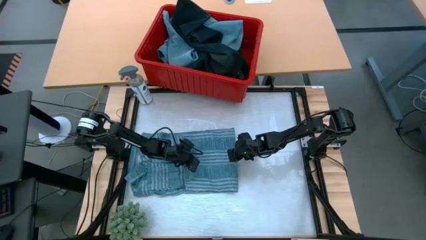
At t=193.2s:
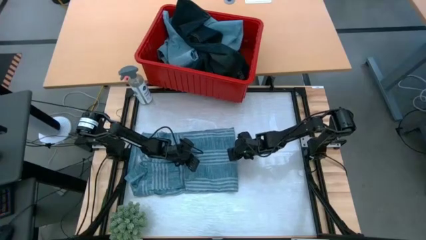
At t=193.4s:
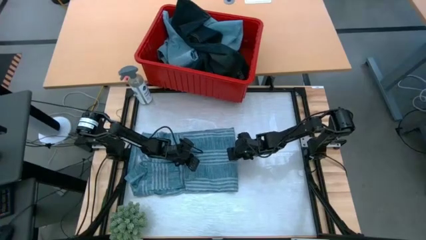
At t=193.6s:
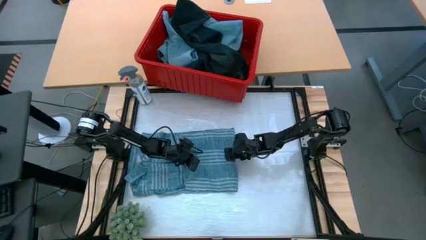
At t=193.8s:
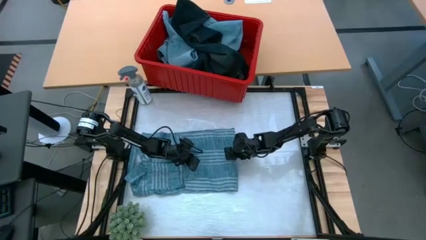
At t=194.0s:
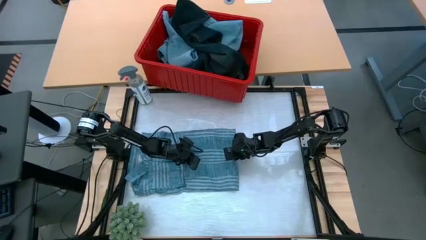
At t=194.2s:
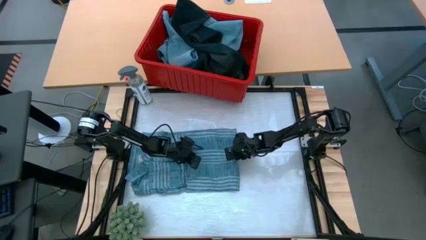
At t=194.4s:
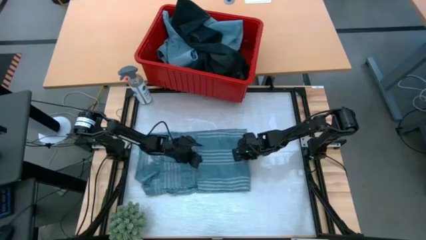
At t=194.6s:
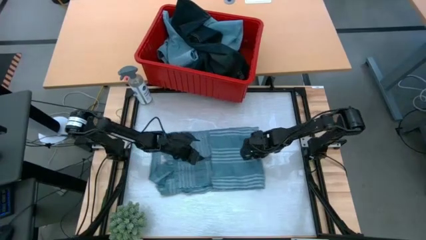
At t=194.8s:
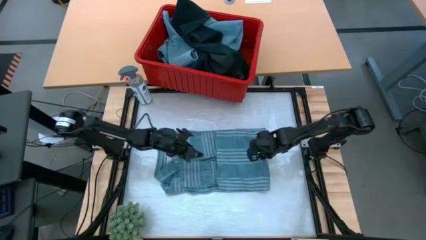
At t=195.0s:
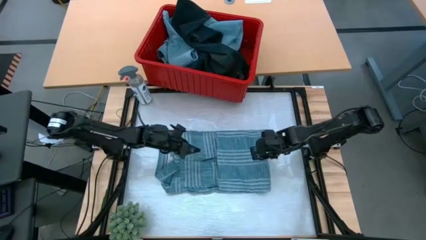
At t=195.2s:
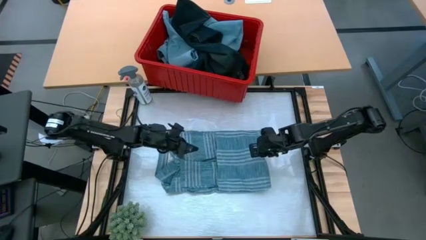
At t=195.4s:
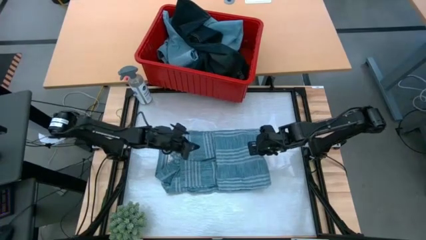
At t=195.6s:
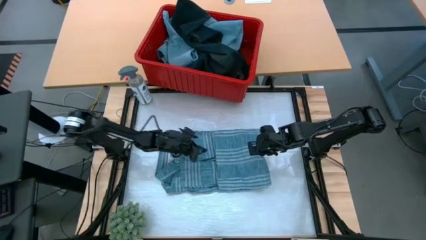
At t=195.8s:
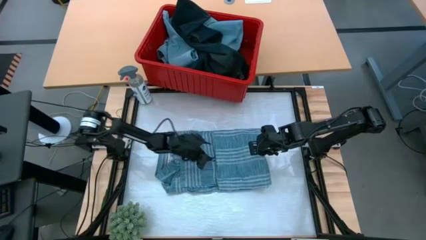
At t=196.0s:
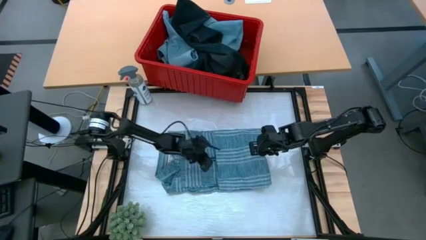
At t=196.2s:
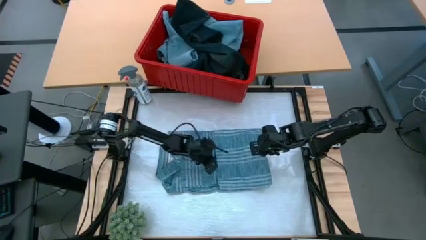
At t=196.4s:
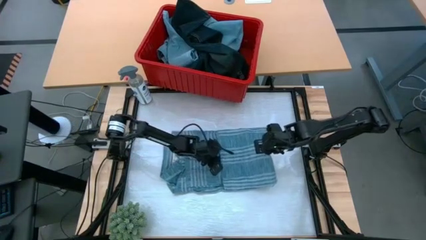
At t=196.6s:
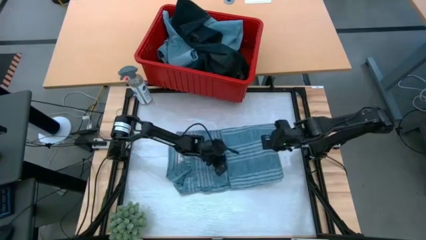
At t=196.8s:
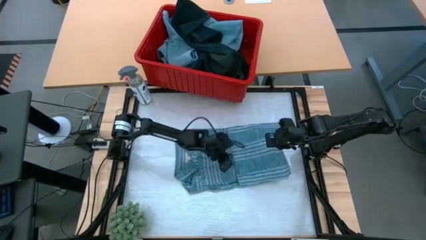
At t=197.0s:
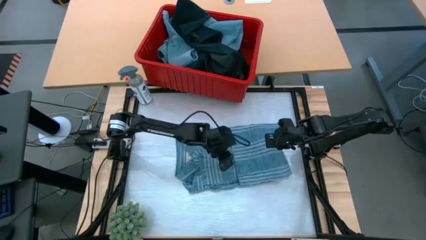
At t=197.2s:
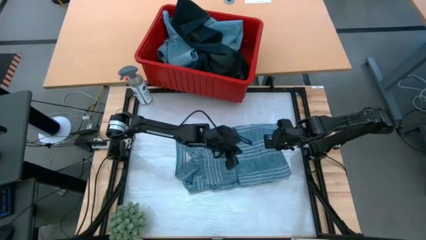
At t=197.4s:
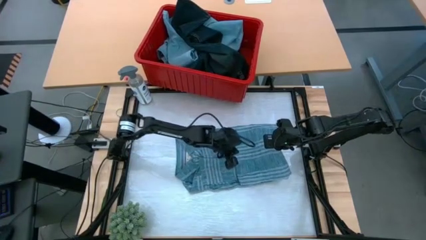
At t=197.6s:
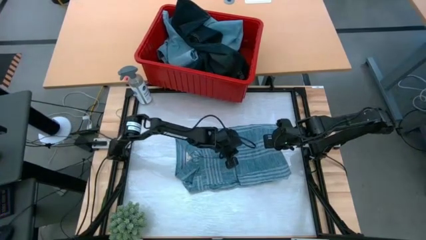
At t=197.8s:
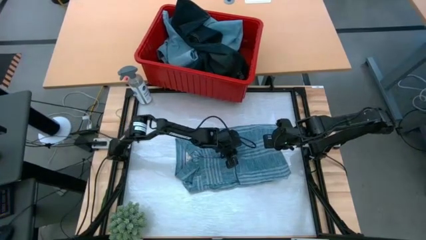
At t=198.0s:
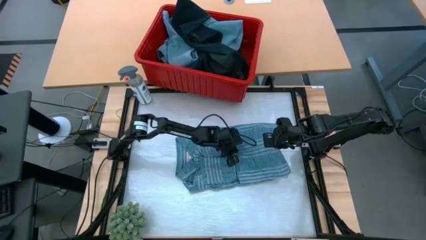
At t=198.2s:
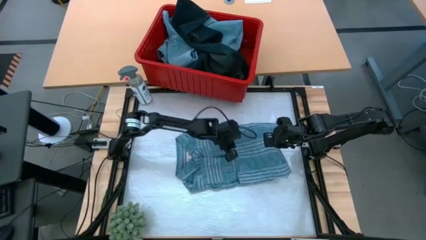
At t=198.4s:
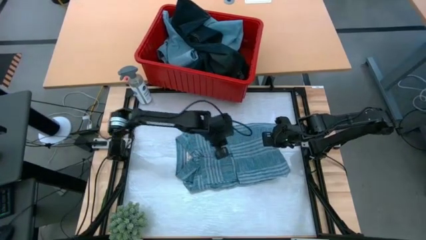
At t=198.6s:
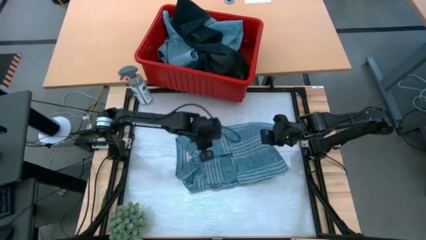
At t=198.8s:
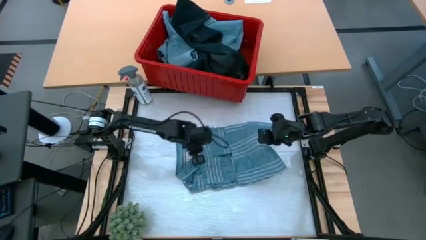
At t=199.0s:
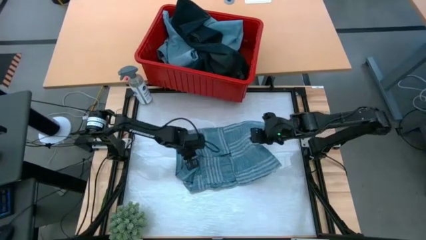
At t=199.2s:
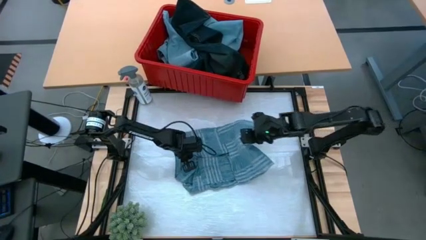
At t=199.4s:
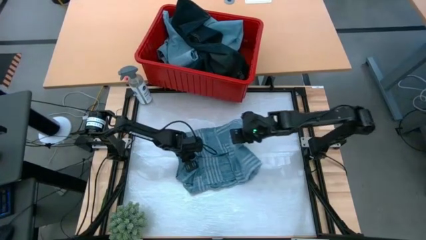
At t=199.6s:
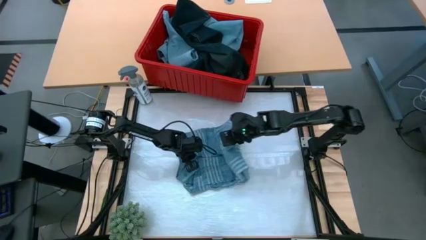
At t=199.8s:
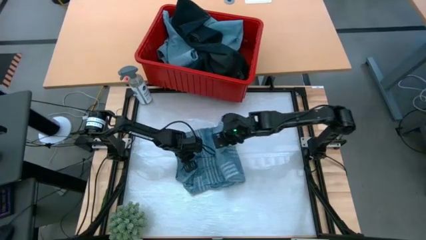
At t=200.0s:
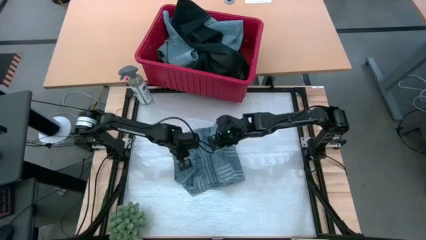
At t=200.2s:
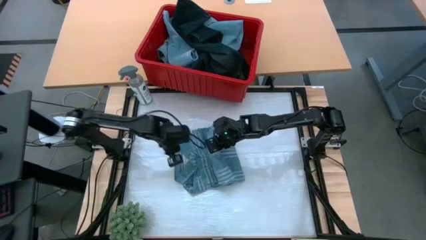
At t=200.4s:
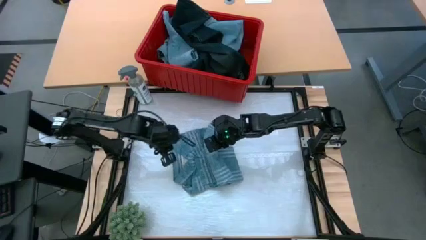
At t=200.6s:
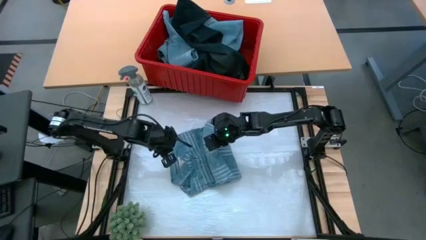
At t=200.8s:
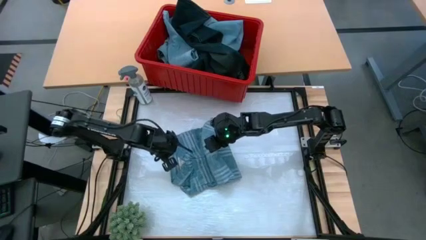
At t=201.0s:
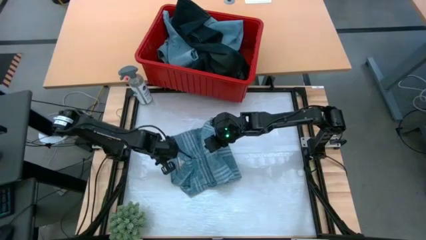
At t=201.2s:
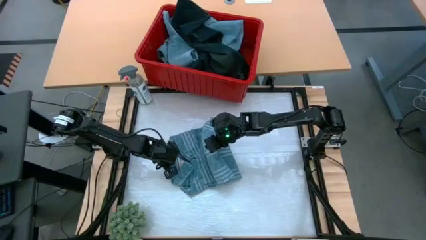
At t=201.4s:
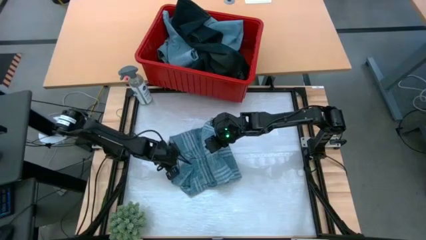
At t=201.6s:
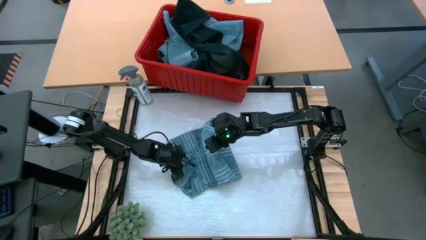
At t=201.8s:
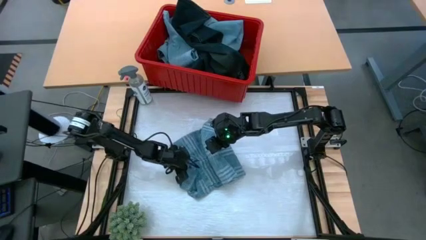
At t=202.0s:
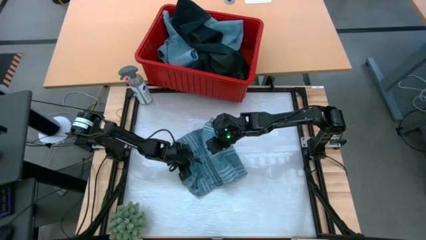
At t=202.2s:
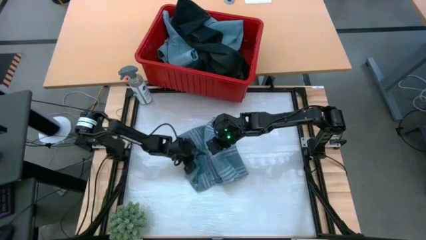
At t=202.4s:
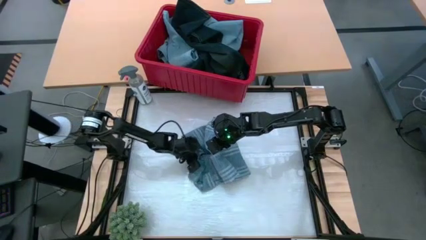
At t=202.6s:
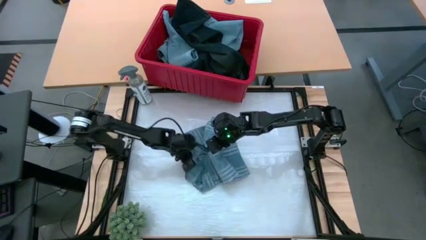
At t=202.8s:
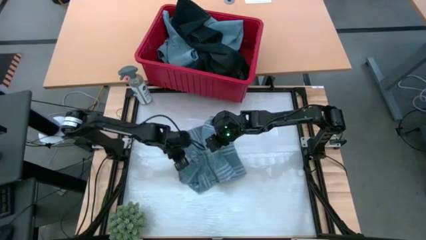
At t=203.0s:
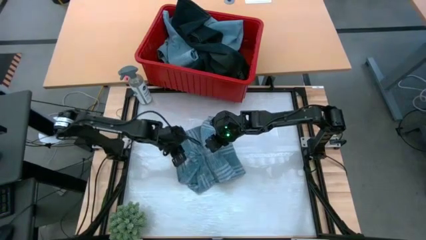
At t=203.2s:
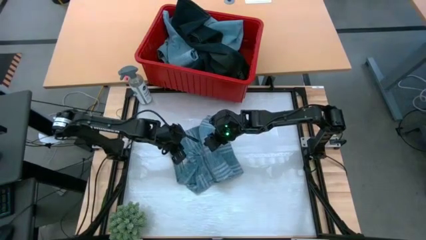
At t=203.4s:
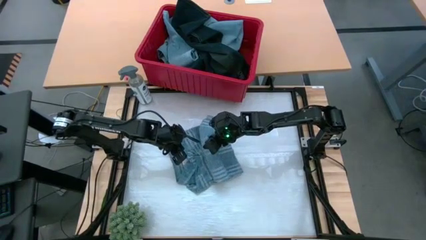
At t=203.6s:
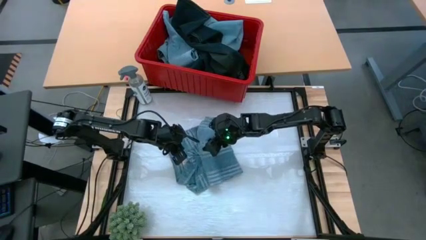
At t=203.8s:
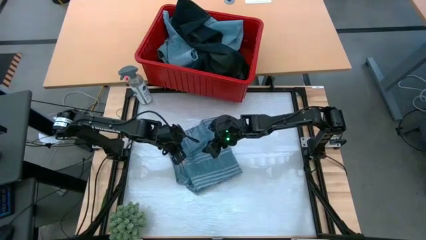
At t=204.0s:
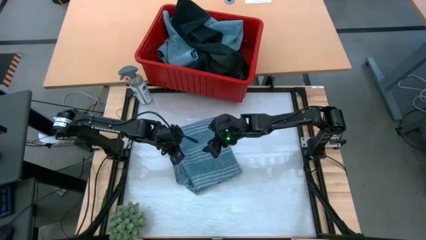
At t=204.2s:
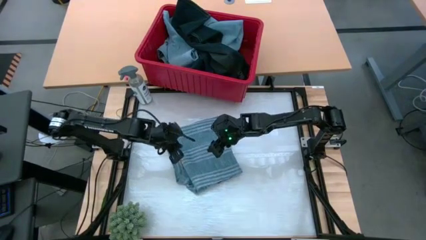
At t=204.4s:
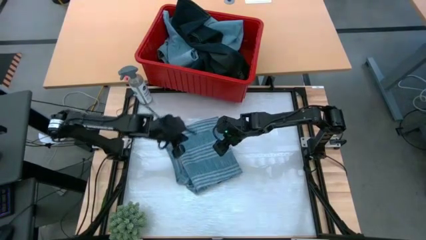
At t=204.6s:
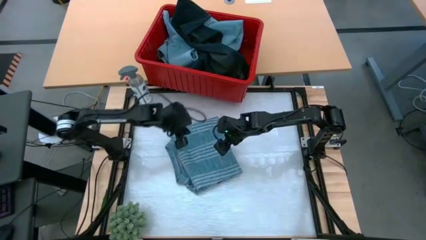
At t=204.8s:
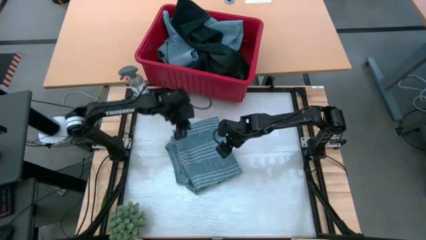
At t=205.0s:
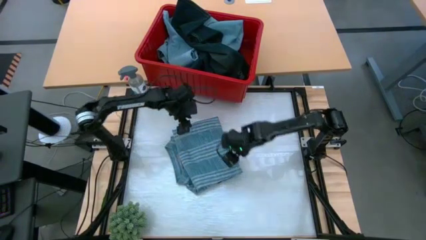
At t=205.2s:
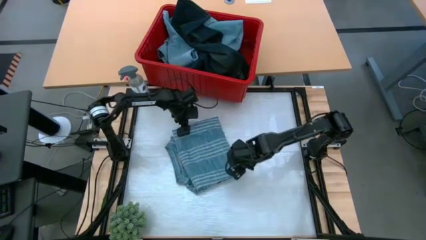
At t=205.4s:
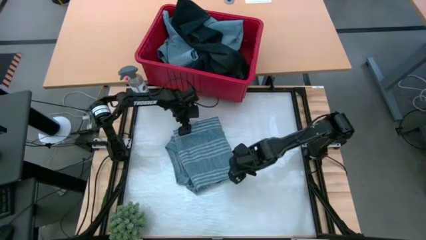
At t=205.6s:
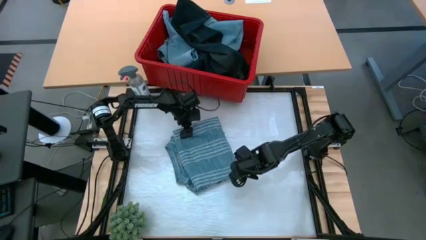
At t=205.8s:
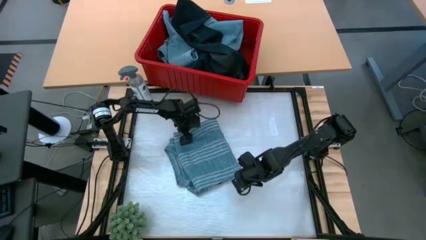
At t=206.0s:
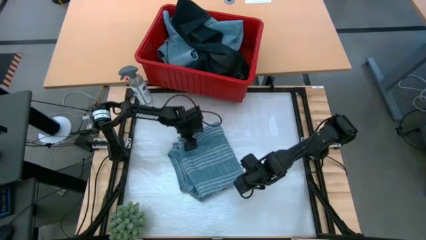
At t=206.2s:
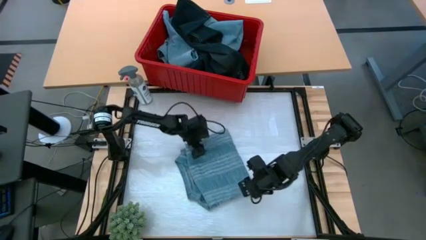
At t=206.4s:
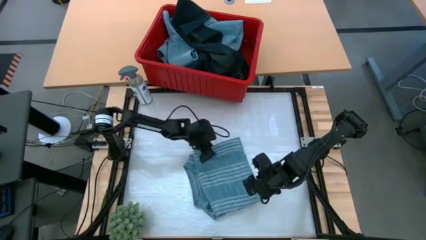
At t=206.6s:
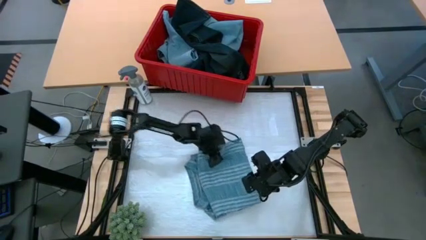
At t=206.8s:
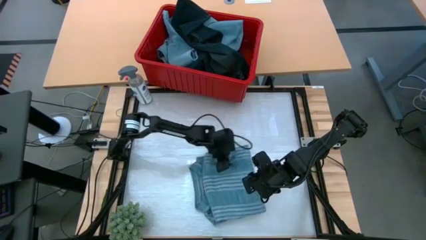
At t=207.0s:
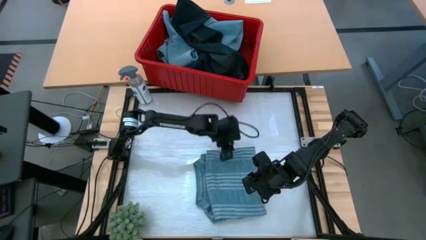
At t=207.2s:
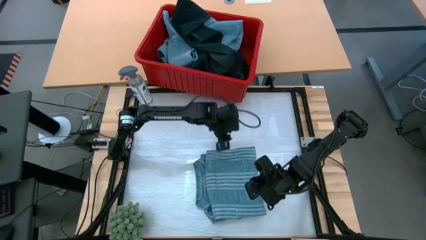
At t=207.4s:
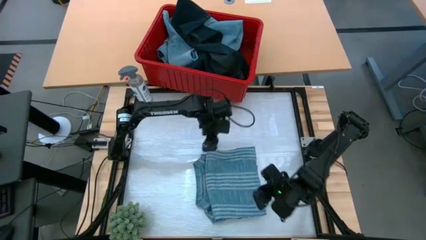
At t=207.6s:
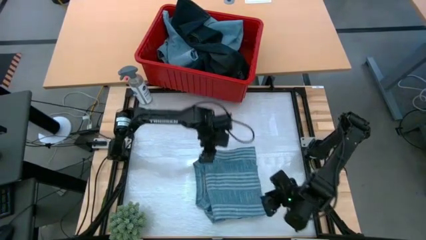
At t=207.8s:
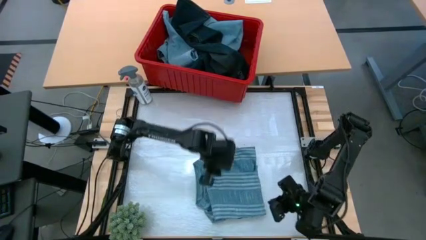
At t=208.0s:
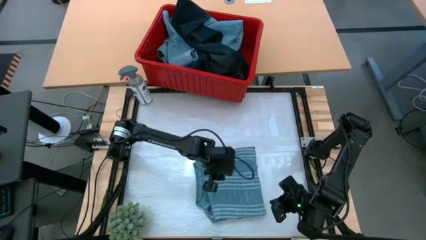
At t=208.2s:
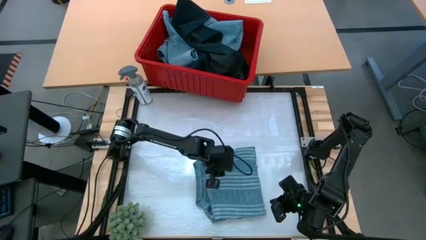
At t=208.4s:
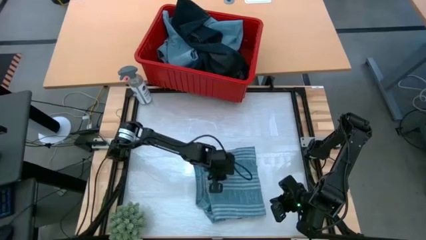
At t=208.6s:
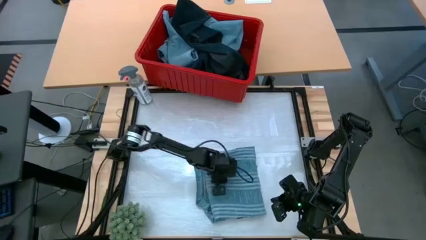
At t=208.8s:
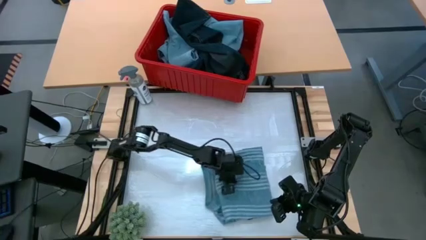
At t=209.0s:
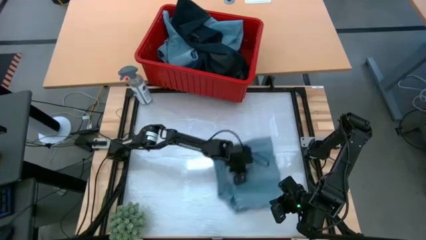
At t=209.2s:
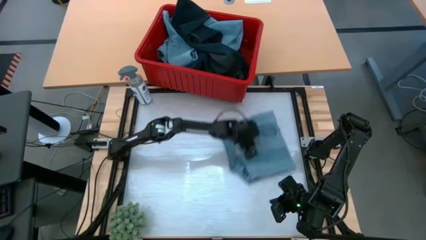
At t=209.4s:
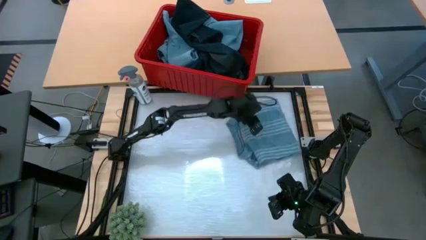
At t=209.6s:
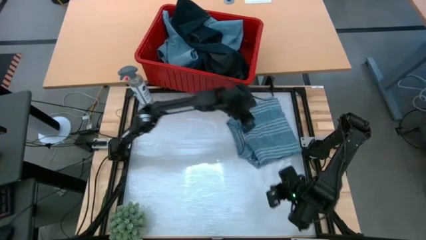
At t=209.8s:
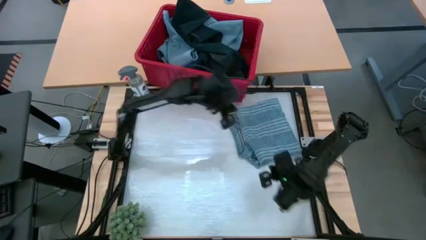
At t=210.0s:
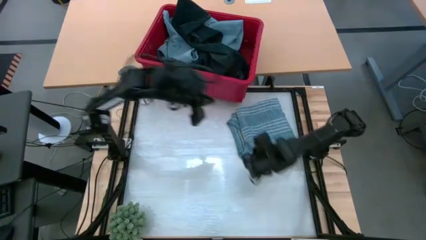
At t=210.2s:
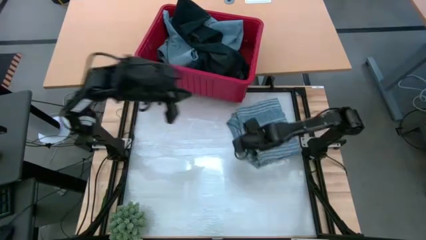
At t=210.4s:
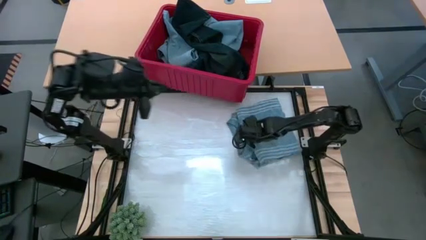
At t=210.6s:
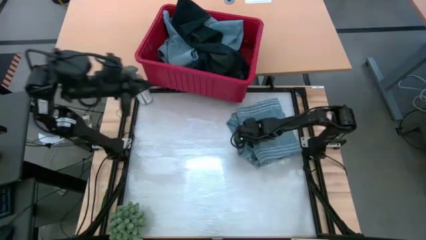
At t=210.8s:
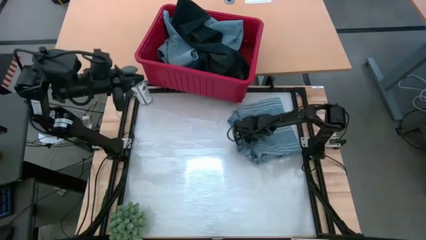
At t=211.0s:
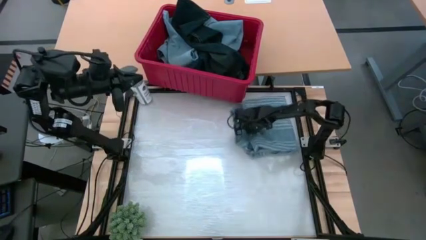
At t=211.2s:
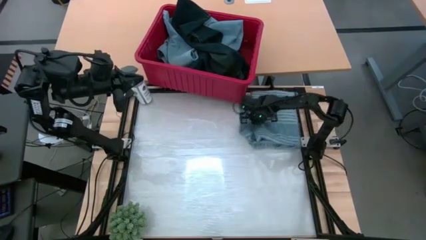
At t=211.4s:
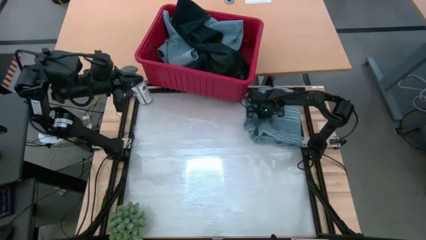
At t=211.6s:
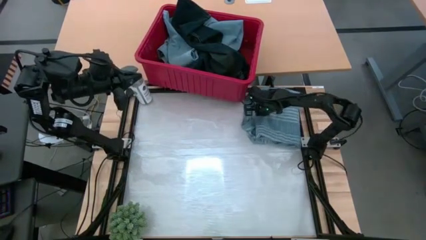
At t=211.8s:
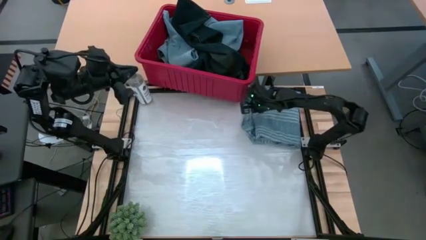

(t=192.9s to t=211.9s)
Task: Fold Laundry from Bin
Fold the light blue shirt
